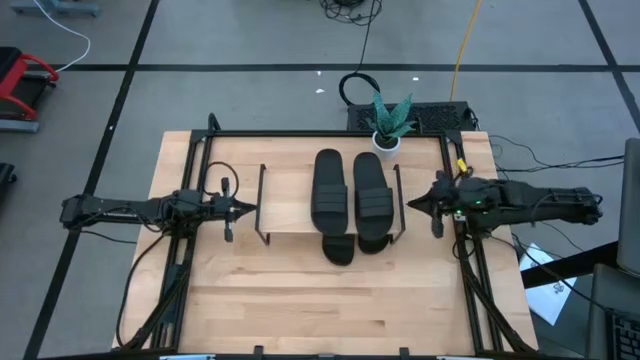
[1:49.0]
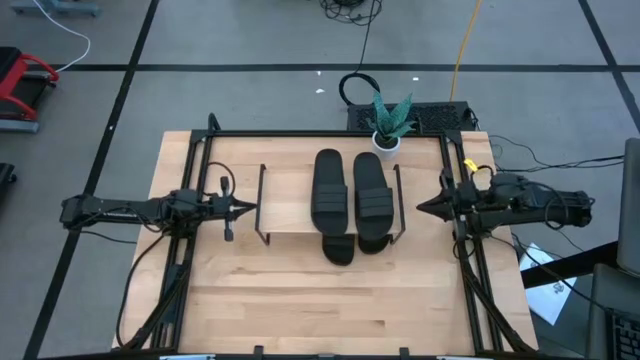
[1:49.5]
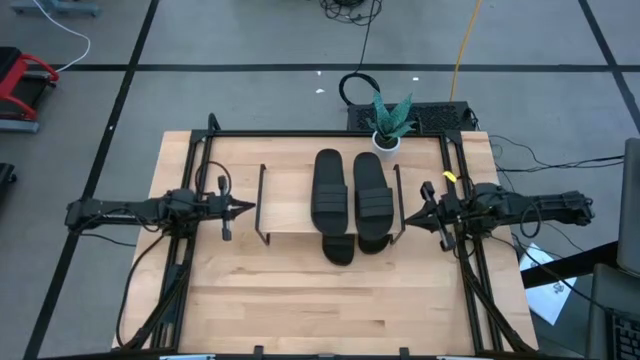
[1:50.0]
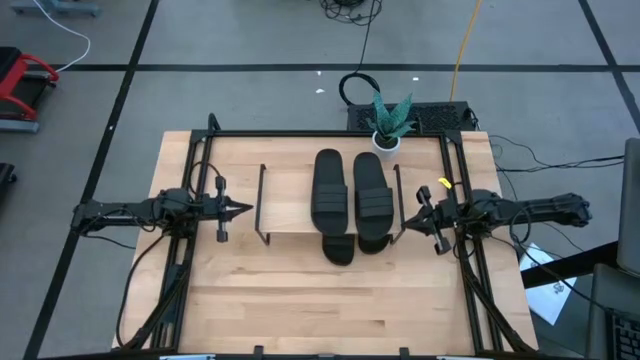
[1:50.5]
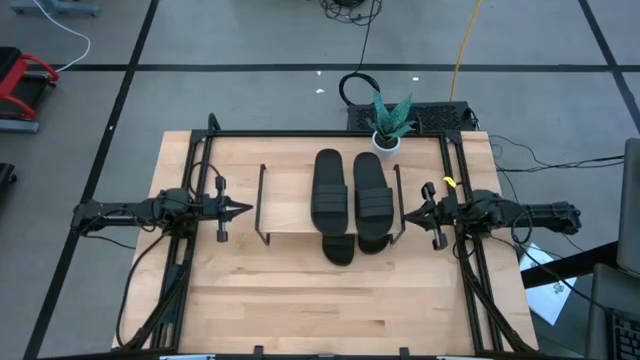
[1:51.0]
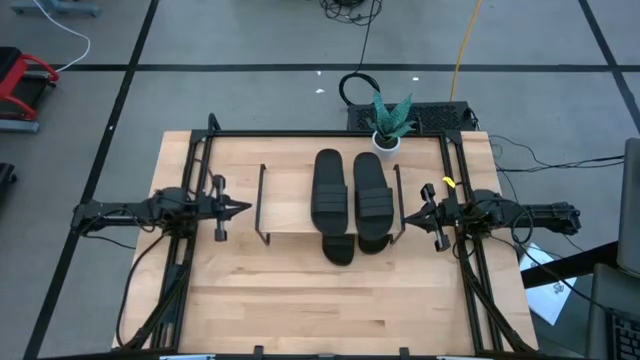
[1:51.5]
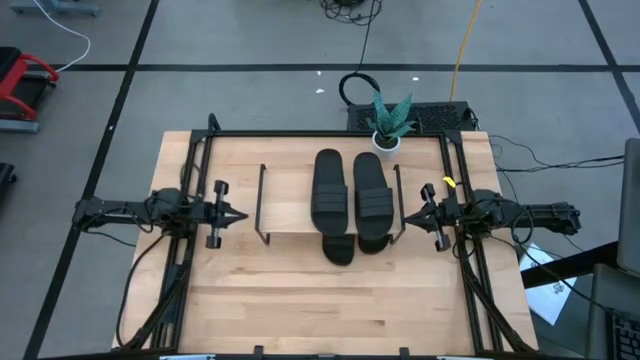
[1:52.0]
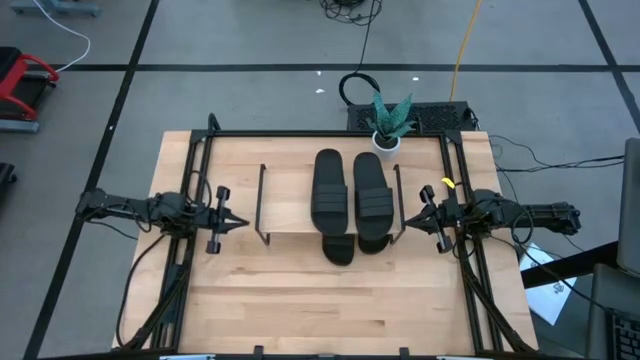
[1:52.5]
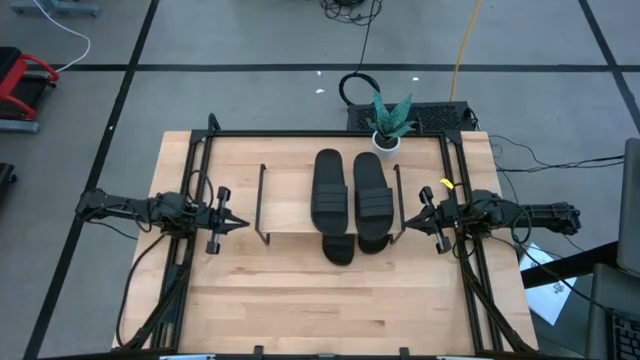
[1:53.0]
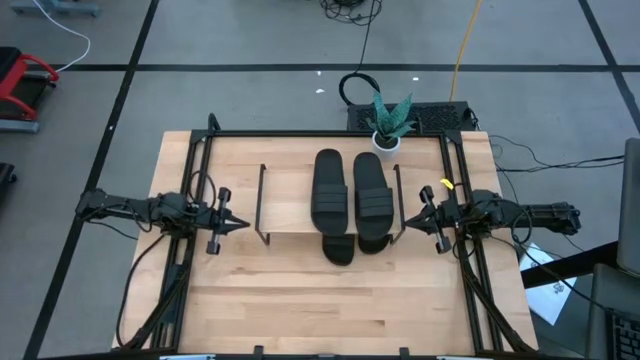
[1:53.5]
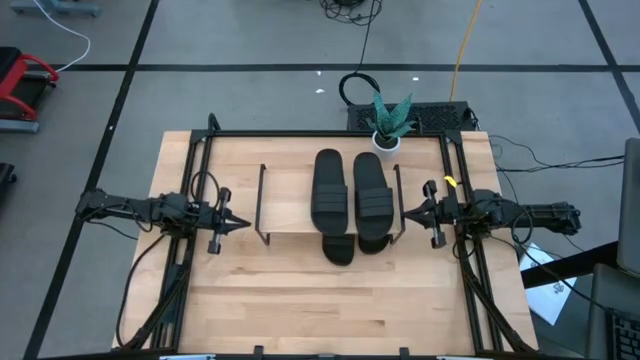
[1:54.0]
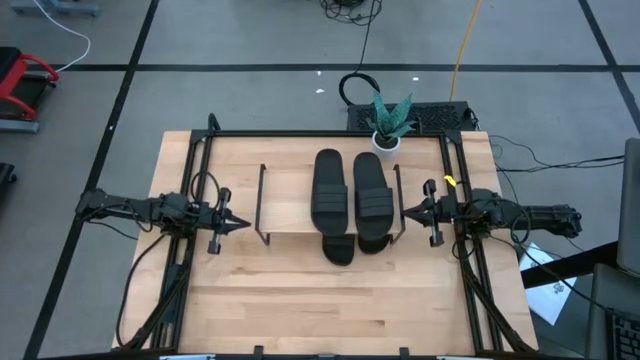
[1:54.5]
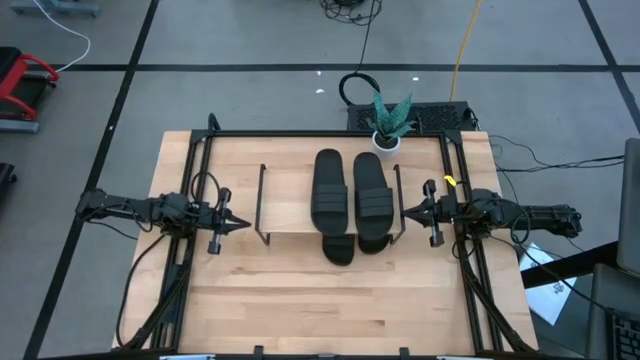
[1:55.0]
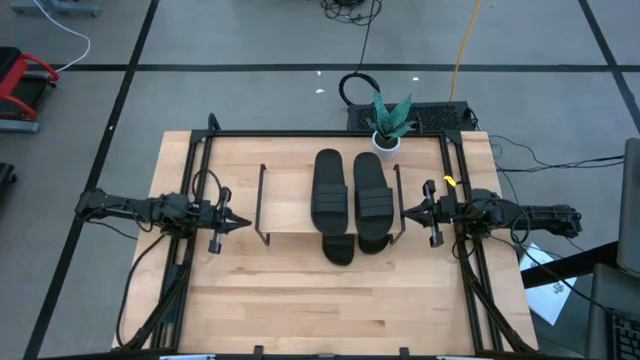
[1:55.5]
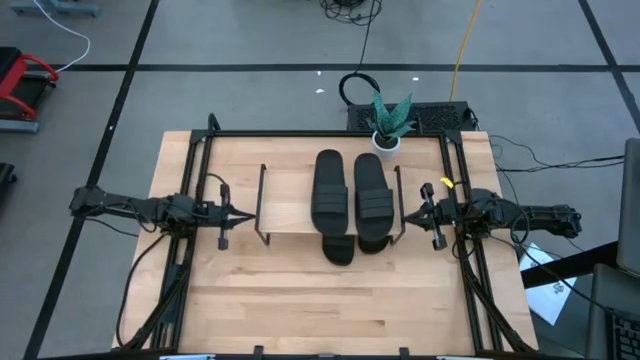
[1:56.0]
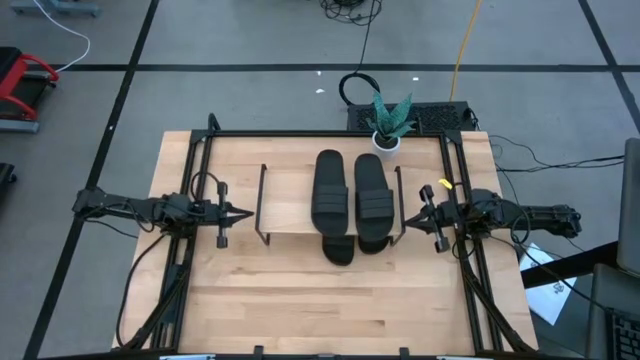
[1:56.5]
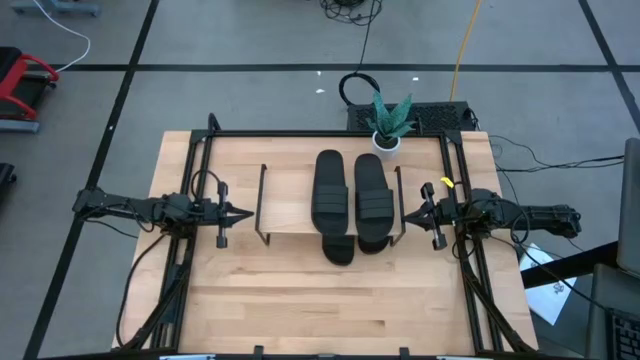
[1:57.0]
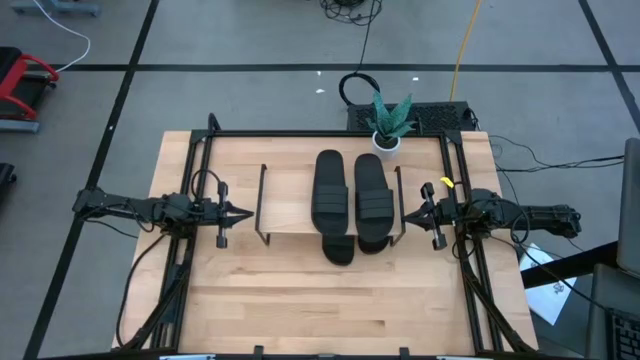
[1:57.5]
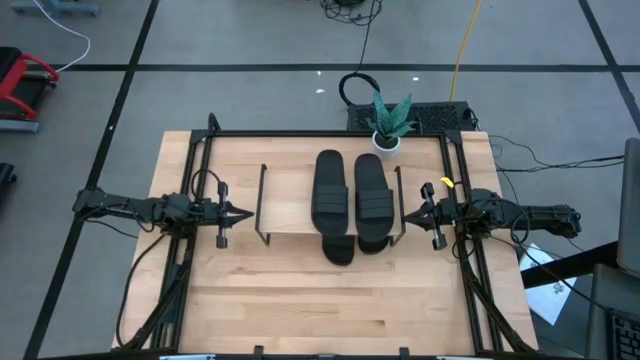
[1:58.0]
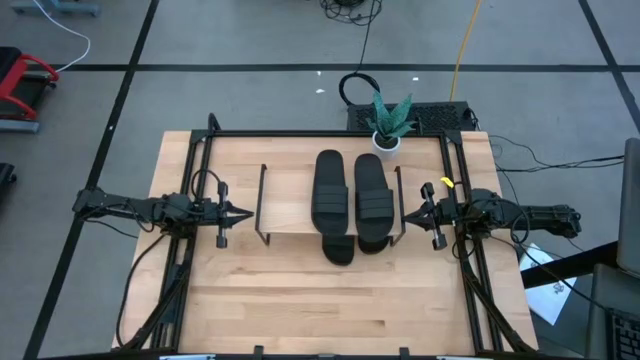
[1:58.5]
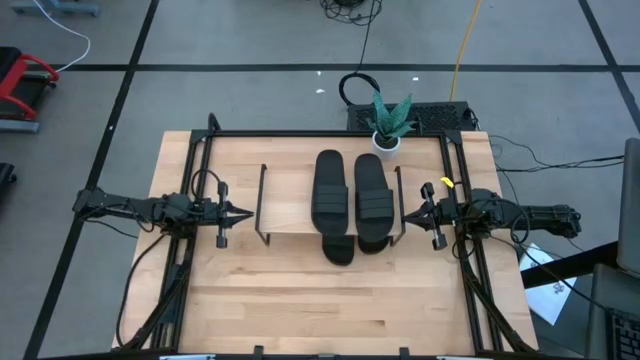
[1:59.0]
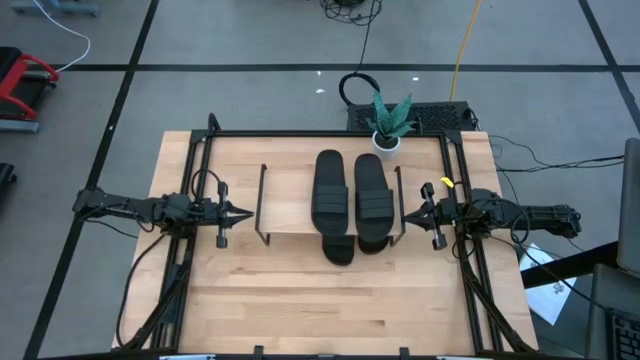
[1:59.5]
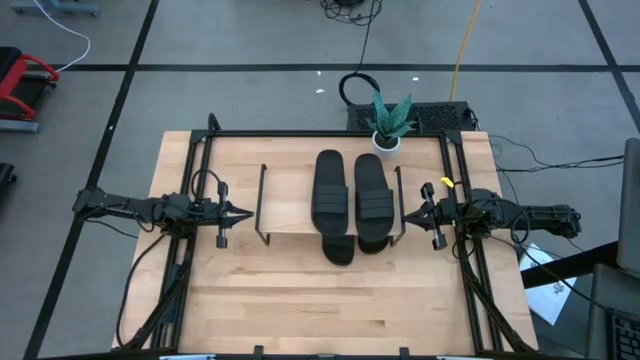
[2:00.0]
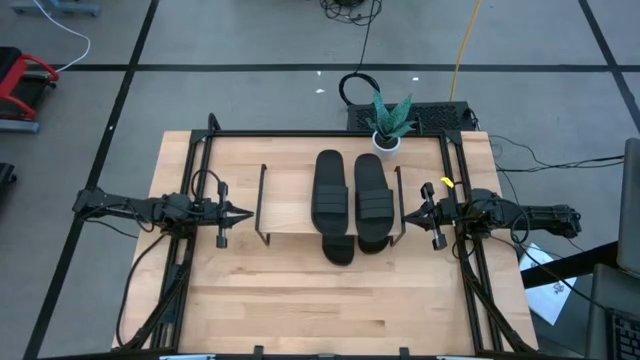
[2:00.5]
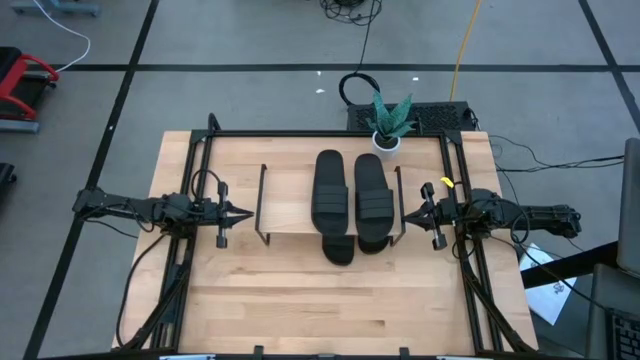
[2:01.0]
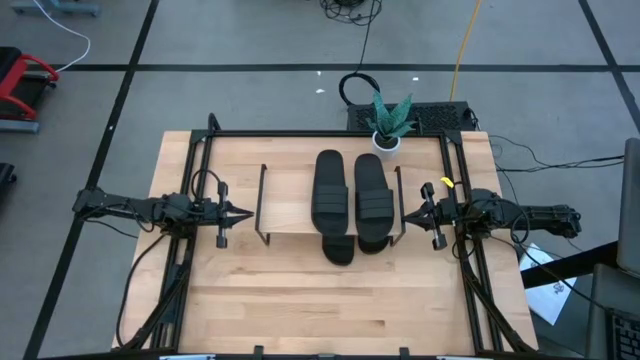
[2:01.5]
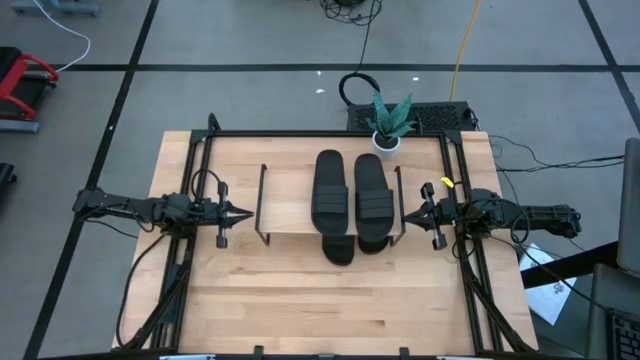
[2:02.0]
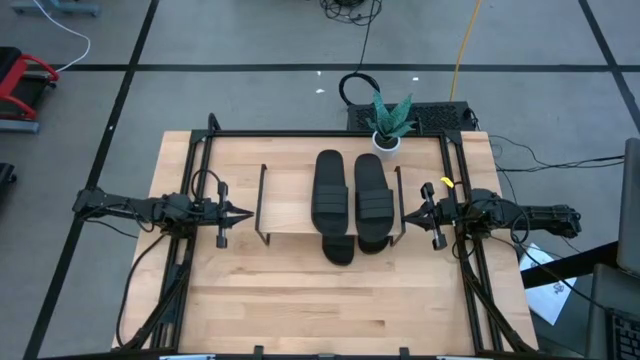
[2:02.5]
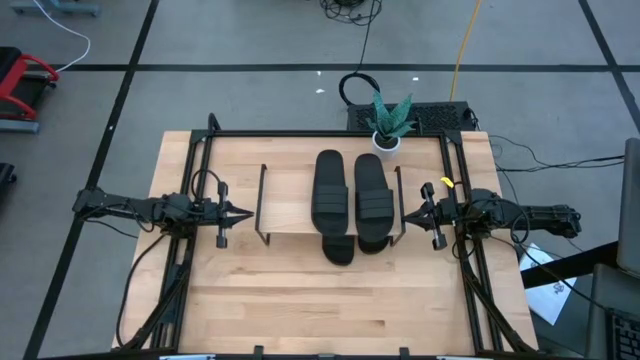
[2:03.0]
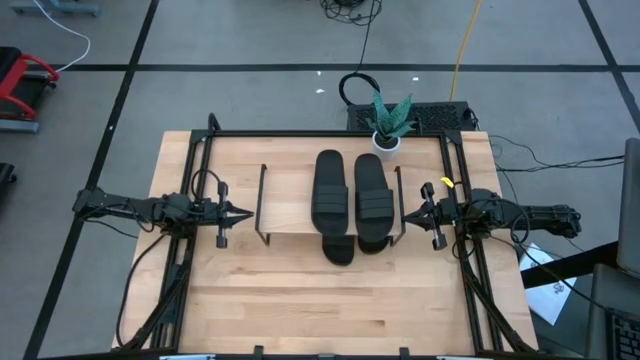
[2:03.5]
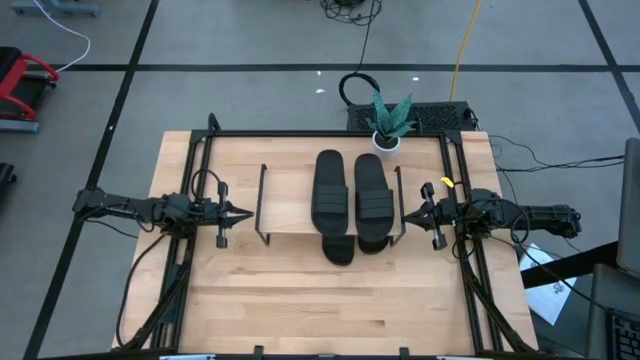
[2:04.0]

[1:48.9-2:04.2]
Task: Pick and place slides into the shelf
Return to Home Position

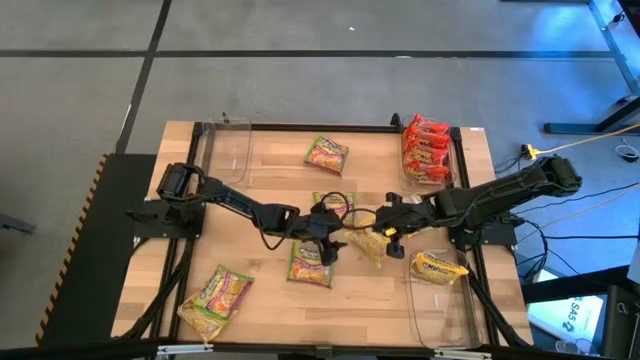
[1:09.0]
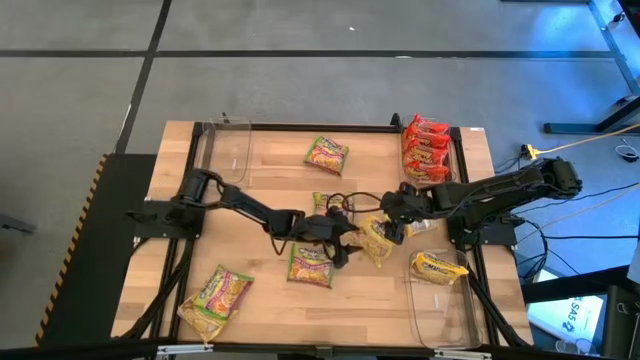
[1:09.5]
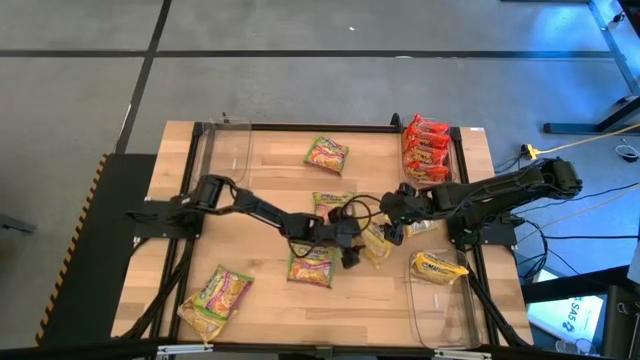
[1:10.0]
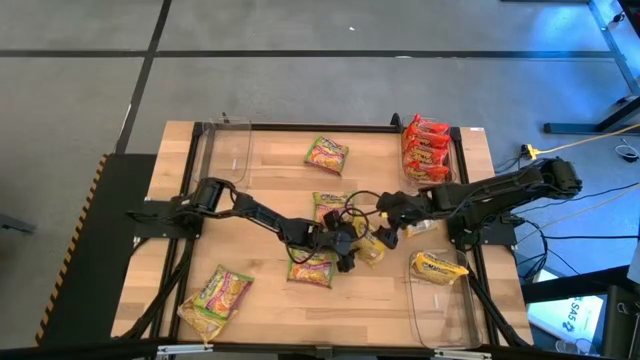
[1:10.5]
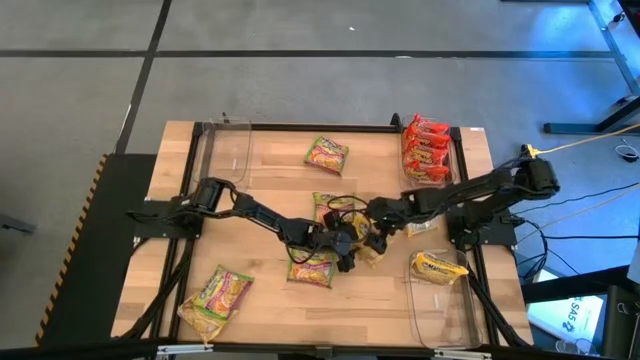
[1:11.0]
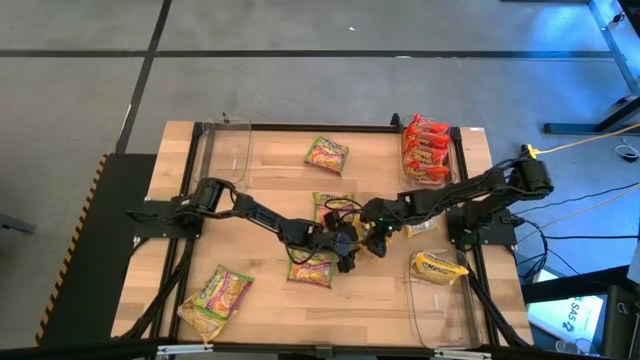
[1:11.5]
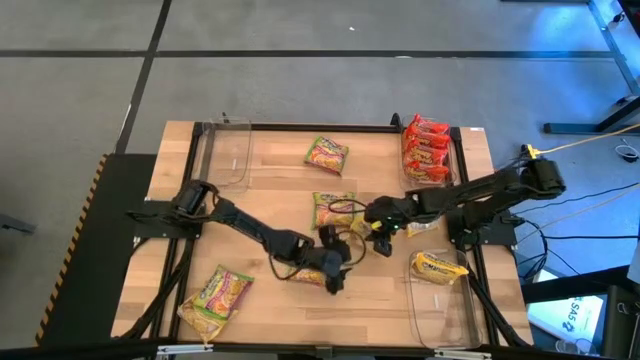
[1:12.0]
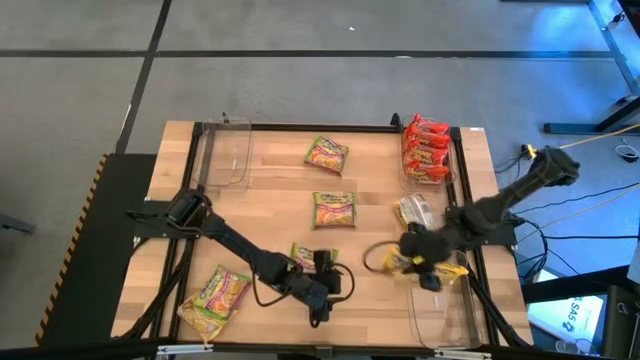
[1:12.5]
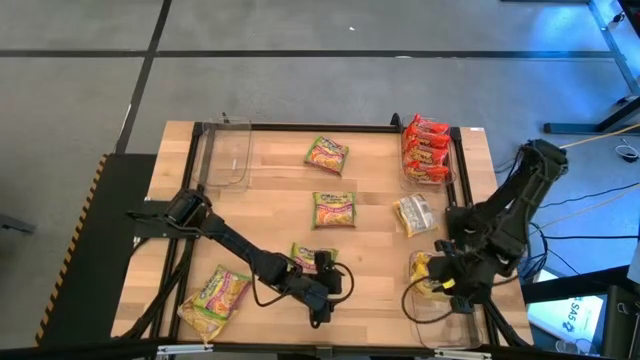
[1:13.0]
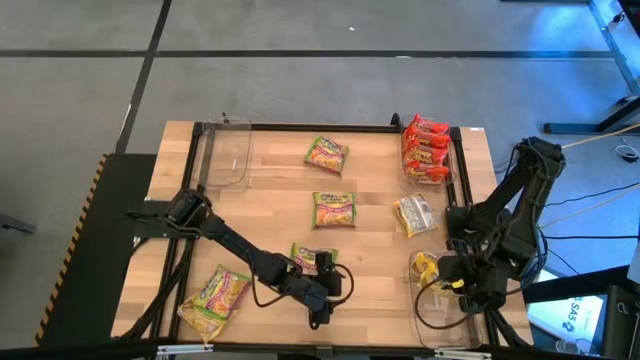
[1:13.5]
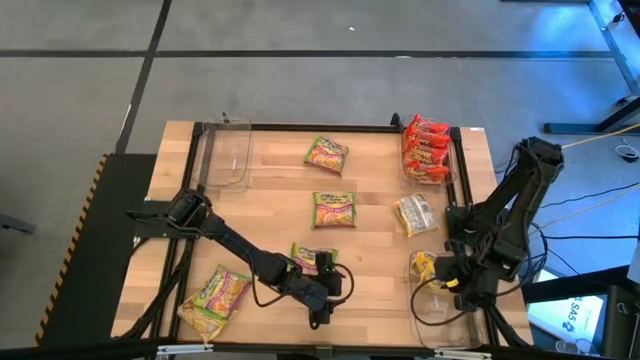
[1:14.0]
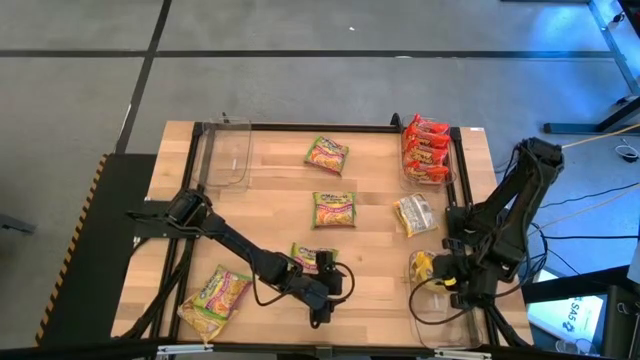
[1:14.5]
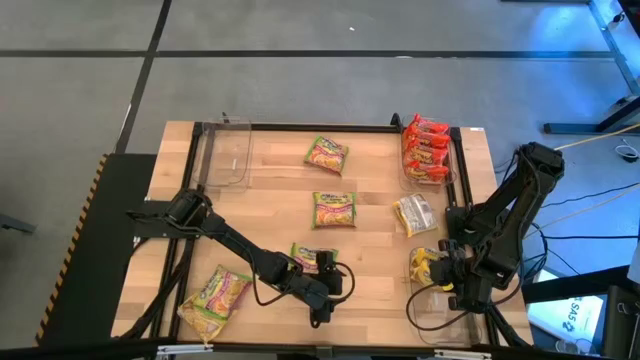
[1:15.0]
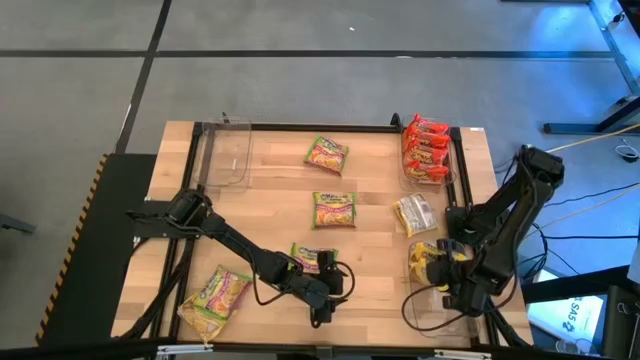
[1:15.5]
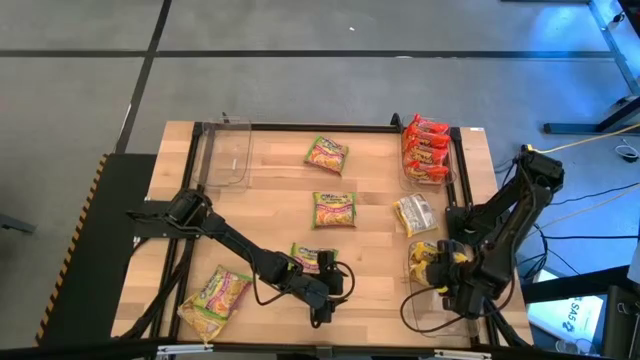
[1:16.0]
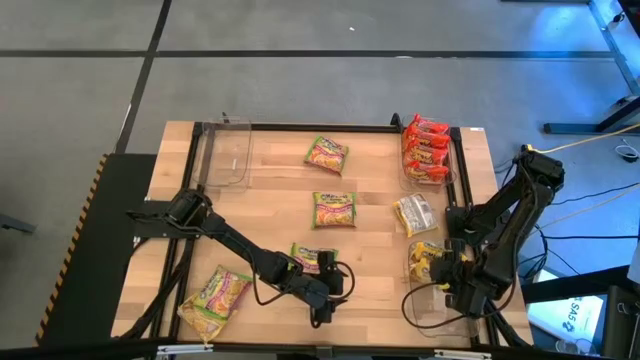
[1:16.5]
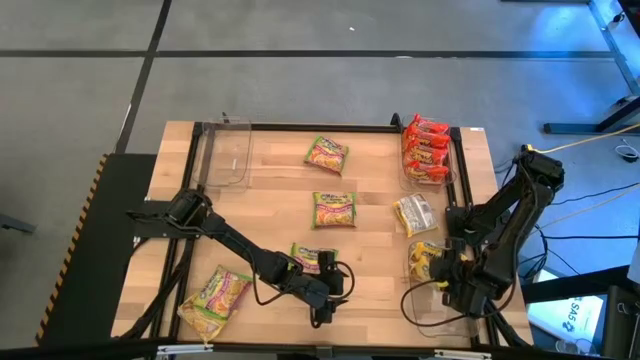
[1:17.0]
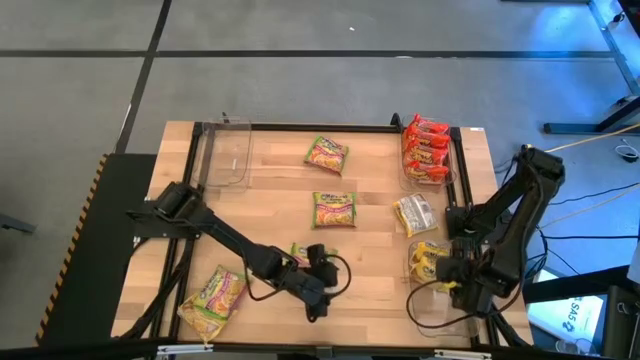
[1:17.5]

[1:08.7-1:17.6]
Task: Sort Maruchan noodles
Put the yellow noodle pack into the bottom transparent bin
